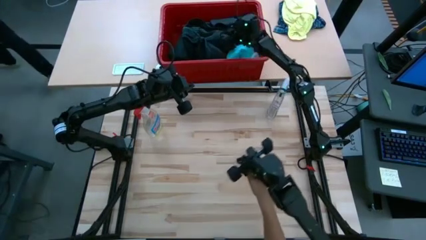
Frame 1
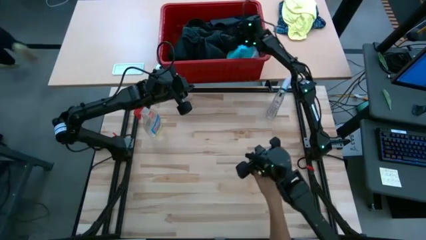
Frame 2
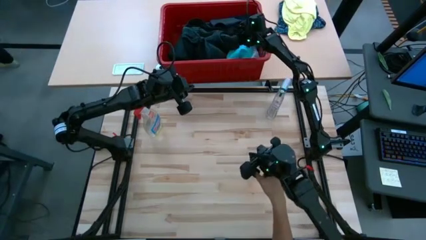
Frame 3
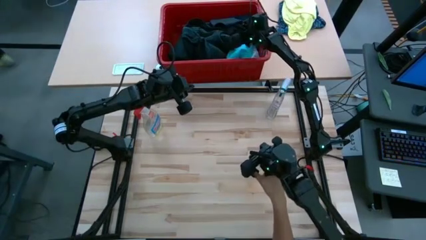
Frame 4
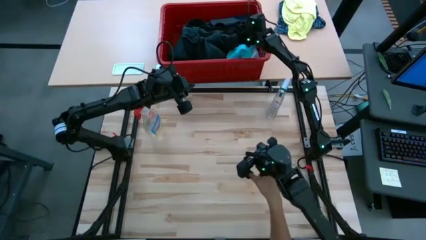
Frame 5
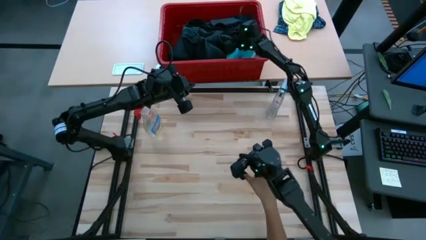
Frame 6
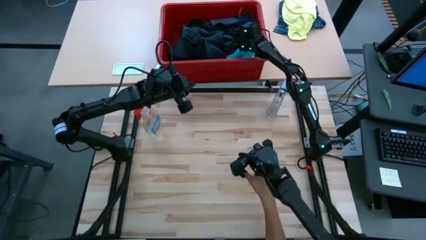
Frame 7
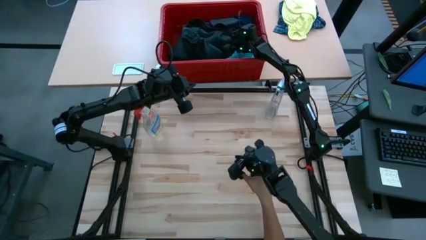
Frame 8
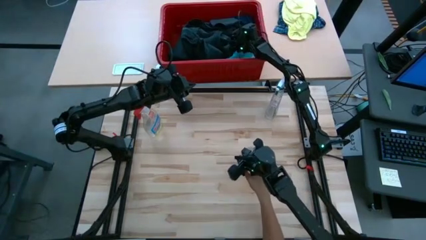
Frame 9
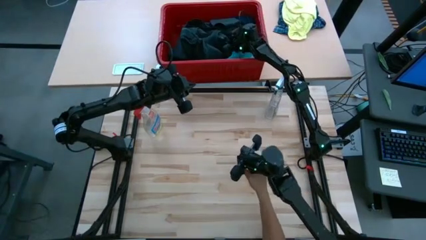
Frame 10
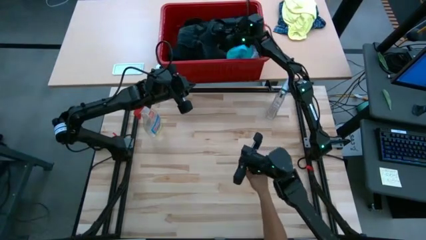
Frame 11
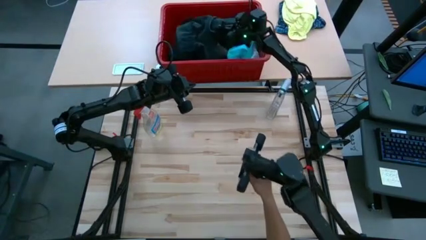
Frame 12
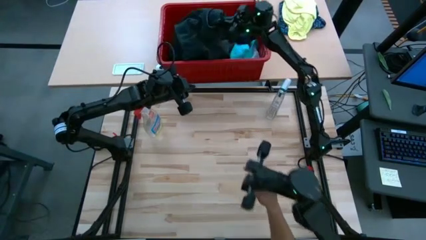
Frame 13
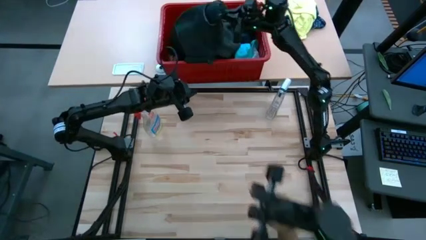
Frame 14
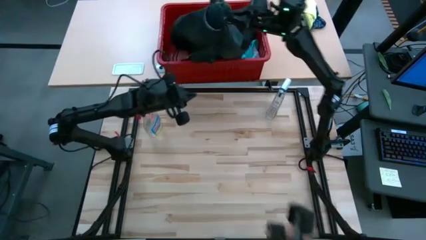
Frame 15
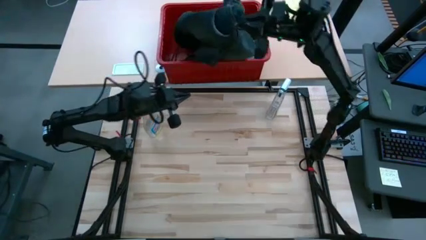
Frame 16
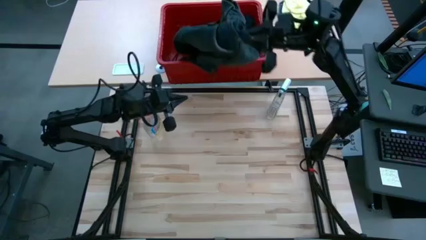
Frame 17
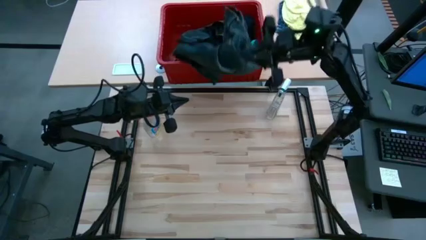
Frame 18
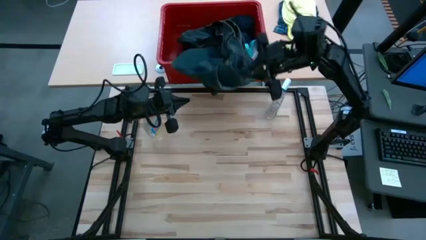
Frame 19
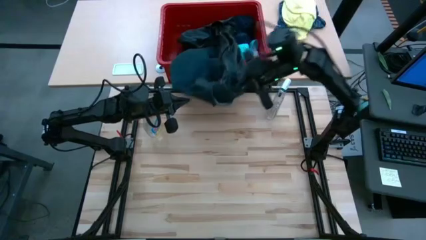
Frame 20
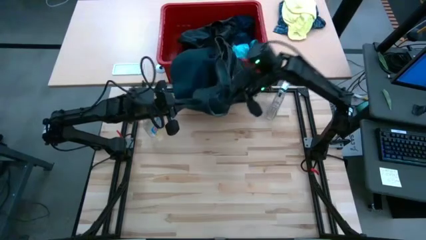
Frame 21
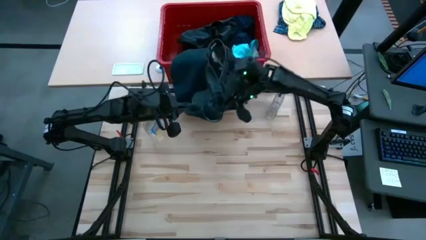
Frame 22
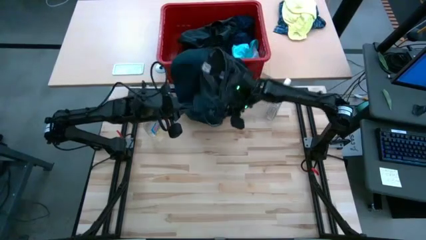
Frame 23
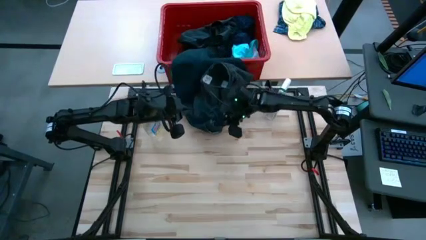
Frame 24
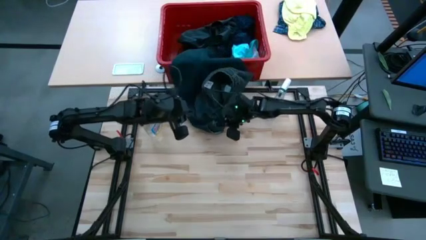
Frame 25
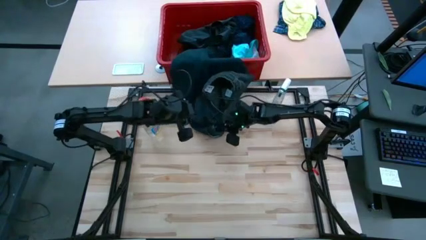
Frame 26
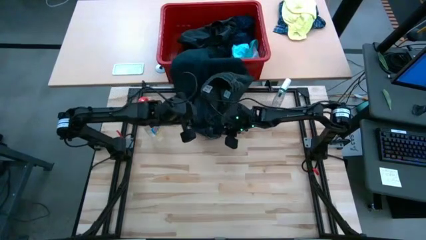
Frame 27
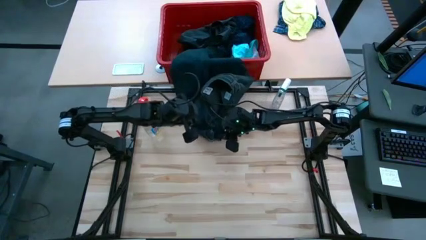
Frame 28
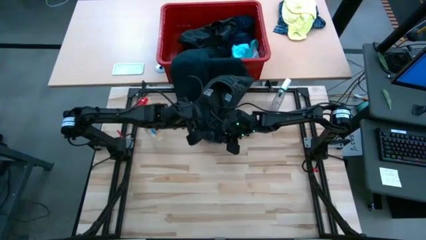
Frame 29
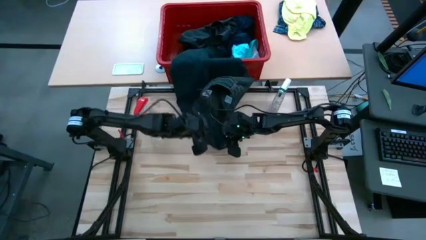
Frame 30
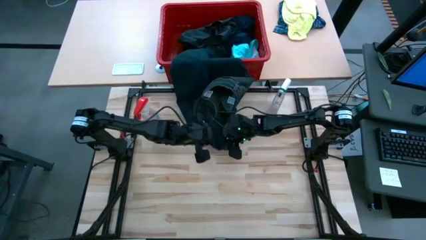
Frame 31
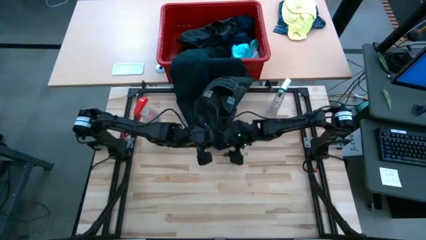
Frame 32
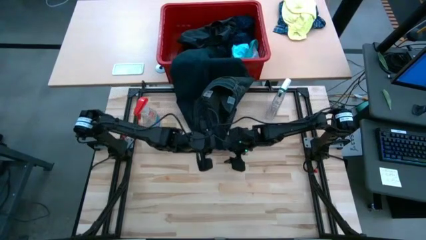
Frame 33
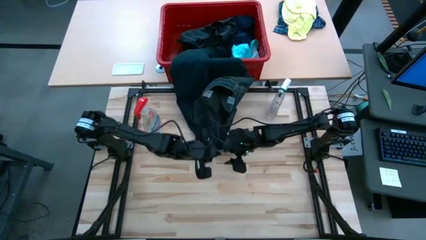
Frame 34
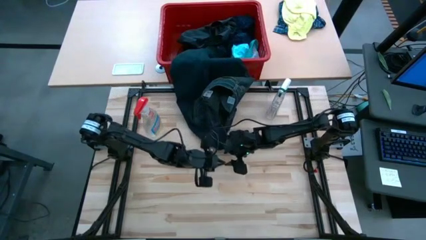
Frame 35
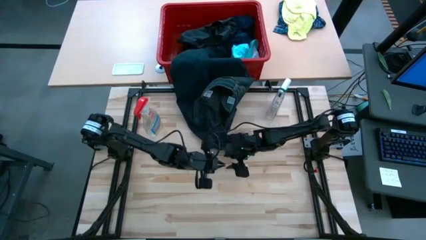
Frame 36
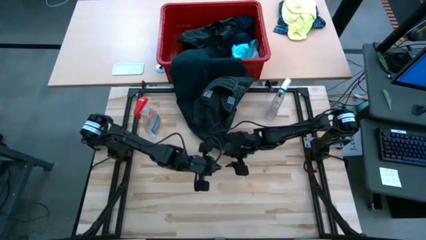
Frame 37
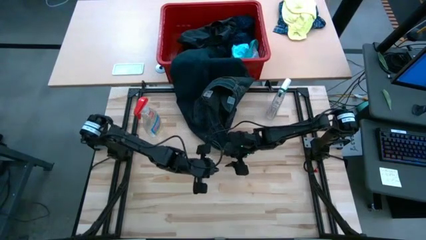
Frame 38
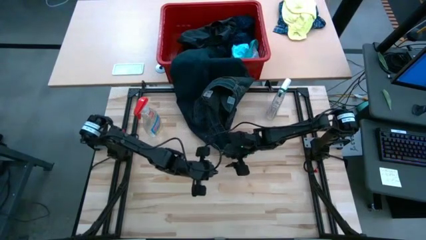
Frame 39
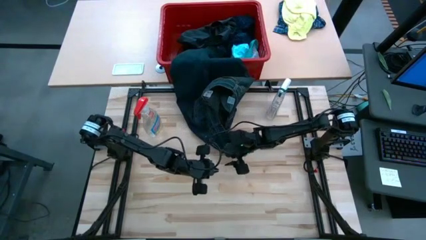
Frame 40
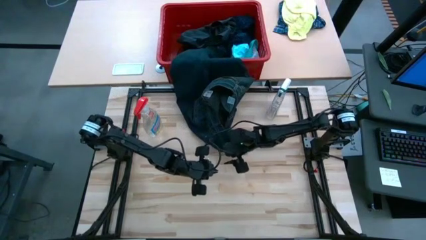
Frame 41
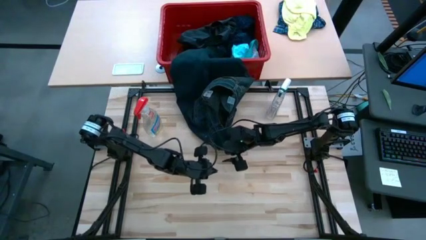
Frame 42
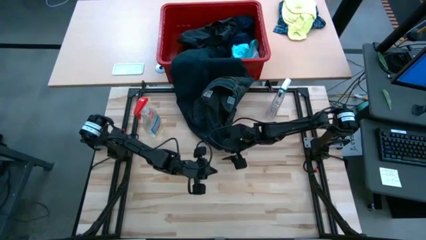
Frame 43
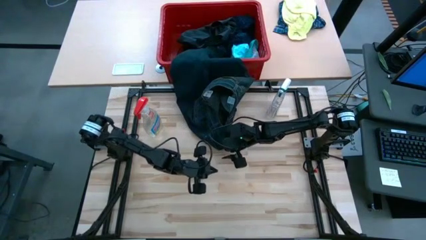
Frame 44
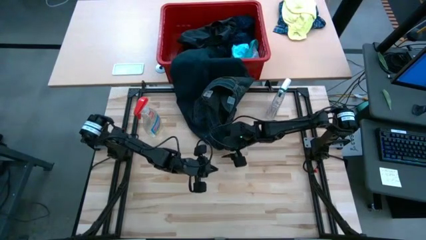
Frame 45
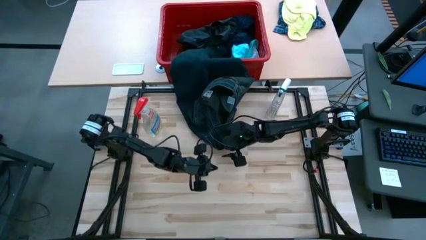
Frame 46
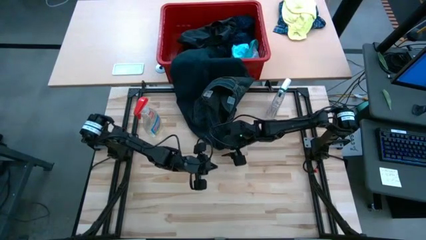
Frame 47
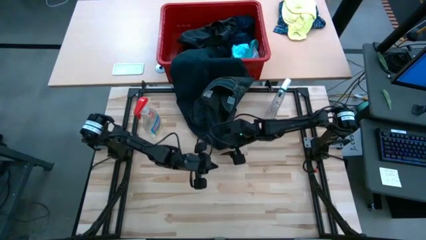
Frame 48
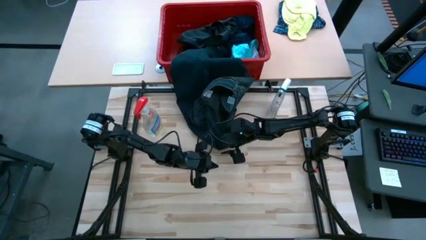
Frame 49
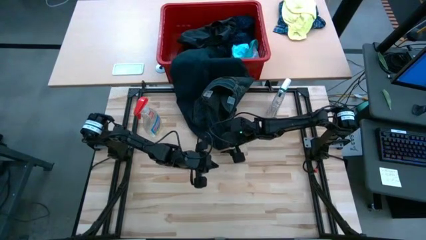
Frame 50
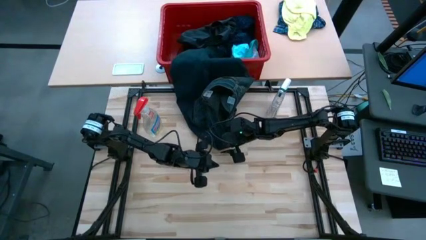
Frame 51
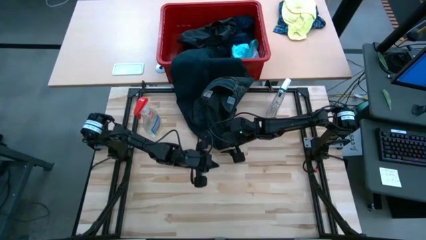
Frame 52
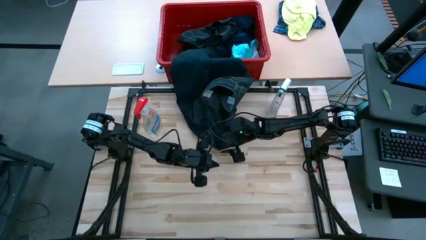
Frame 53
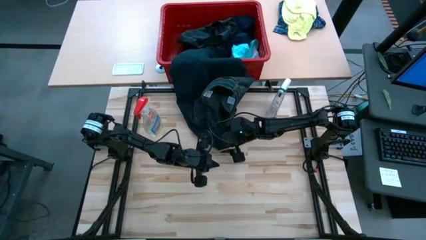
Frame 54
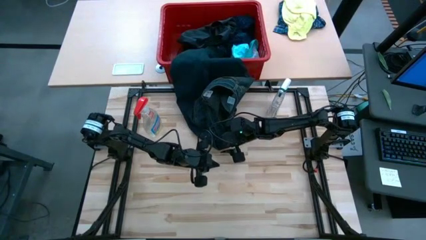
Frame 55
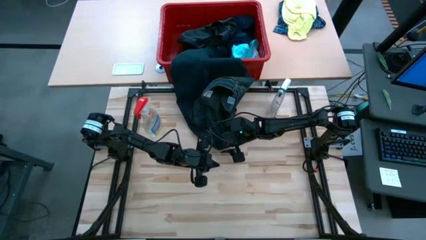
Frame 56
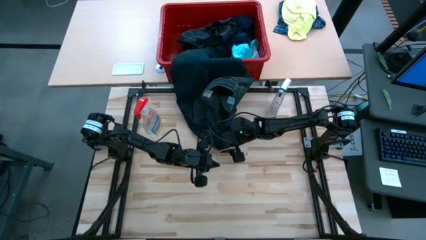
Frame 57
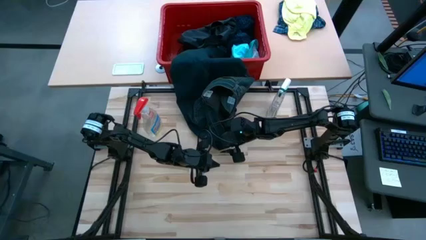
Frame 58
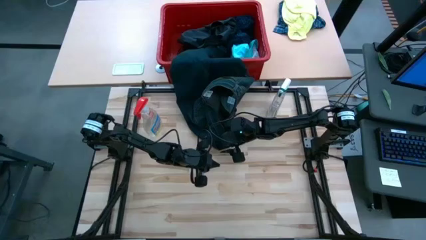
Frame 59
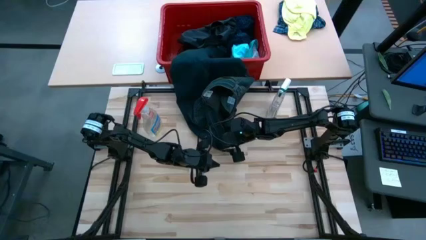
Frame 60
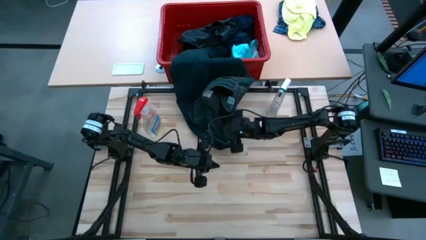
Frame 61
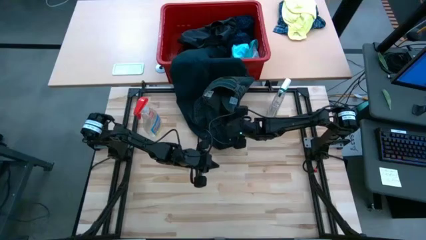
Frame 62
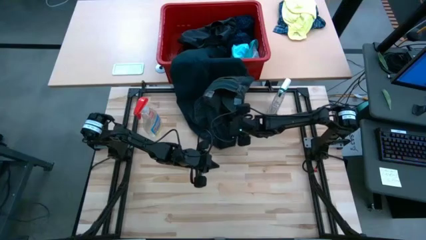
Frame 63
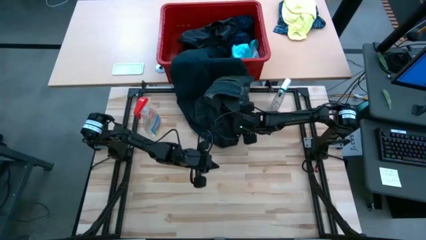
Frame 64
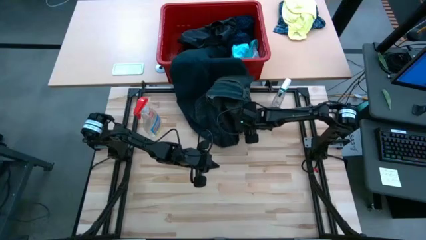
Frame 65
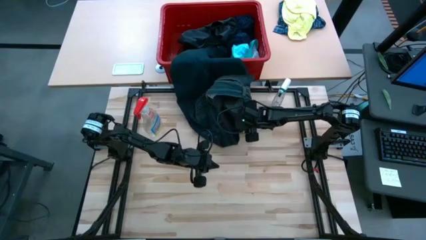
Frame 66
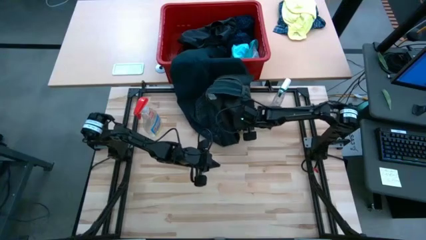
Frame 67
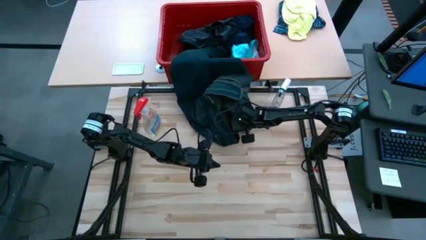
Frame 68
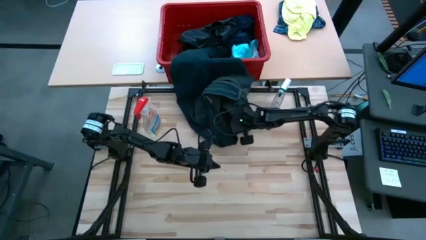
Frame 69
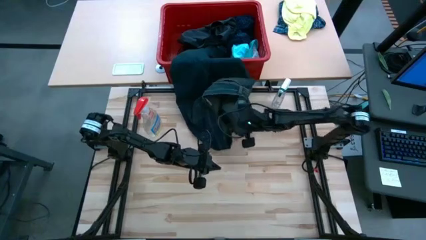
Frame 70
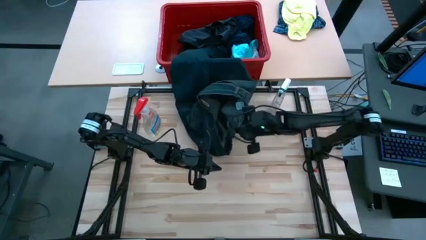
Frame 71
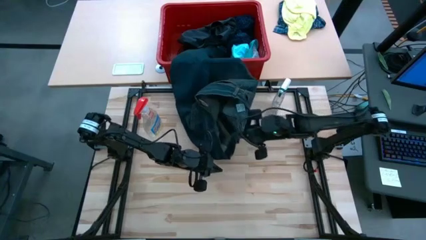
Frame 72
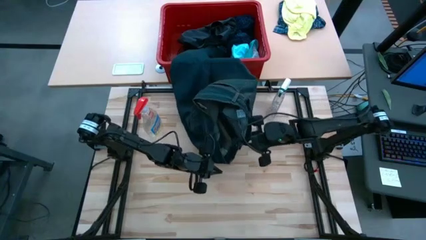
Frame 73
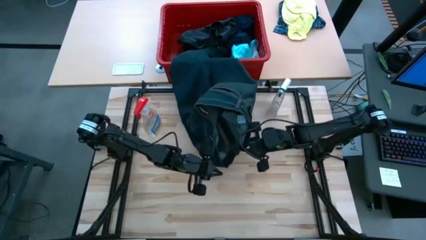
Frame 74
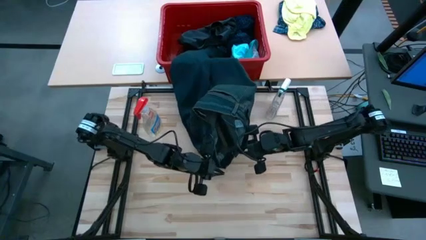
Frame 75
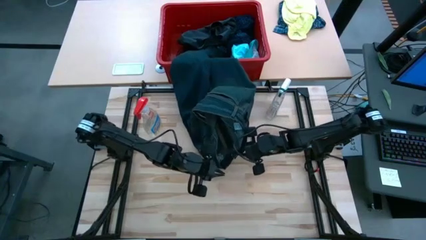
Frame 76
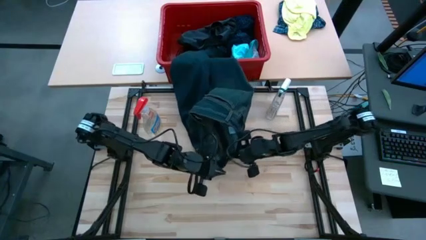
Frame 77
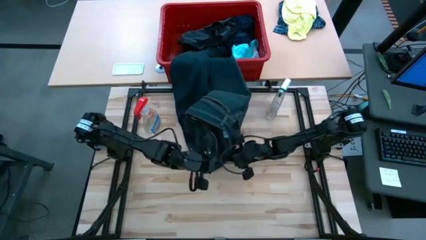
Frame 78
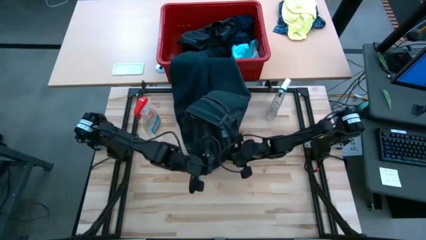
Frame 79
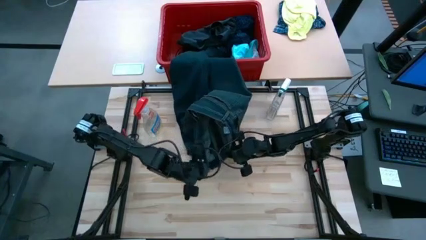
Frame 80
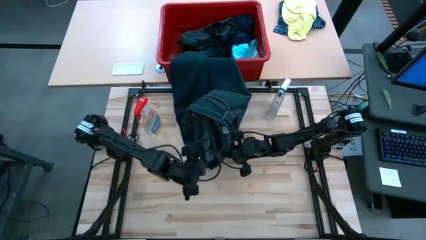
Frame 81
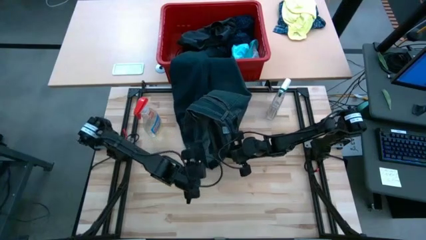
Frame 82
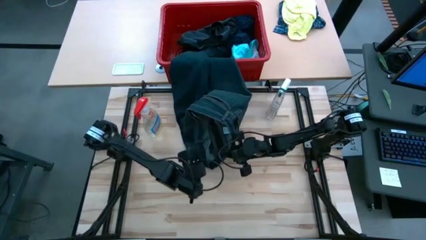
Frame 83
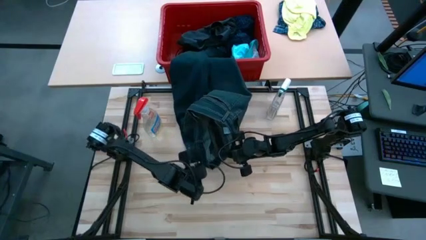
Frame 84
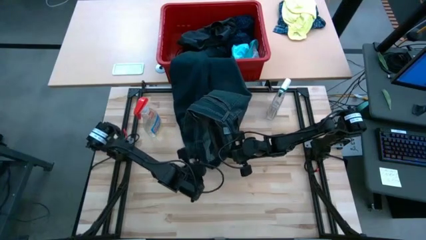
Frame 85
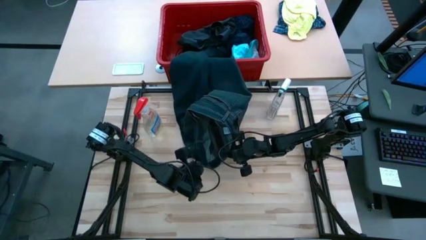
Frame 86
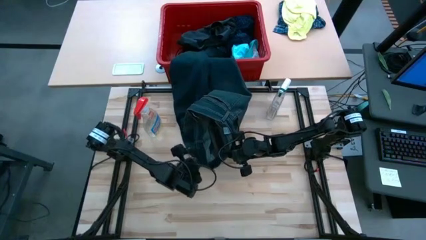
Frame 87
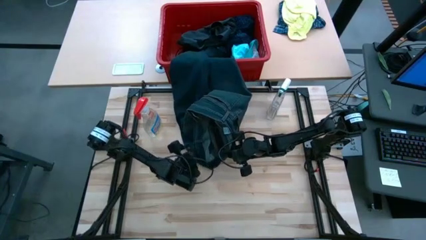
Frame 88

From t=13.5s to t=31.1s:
Task: Fold Laundry from Bin
Fold the blue pants
